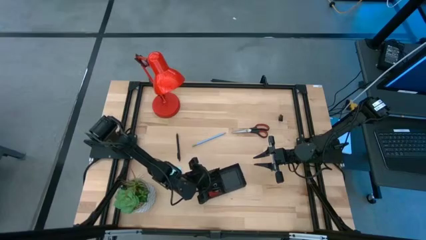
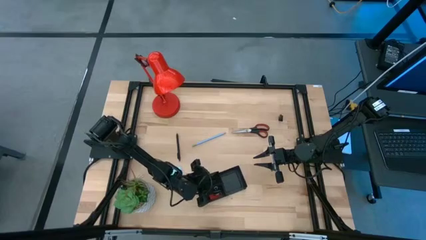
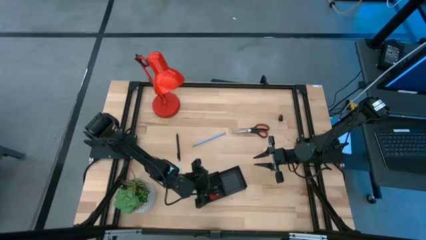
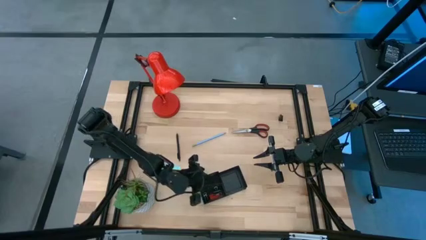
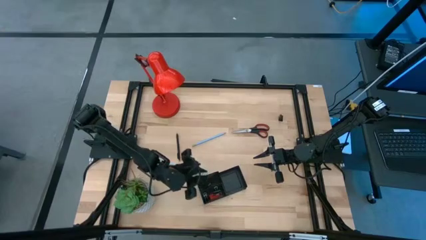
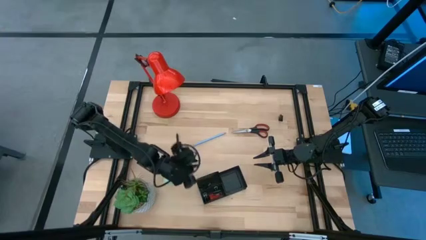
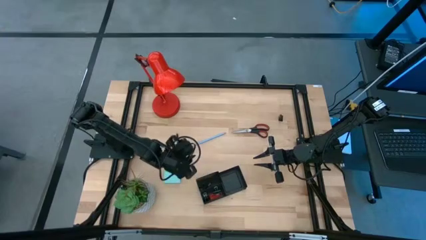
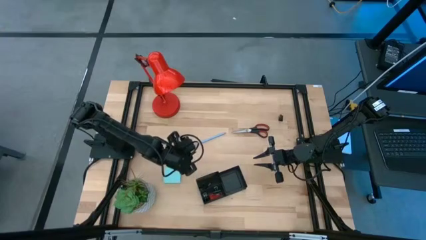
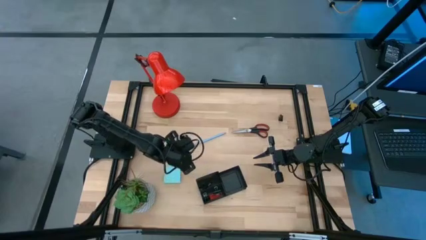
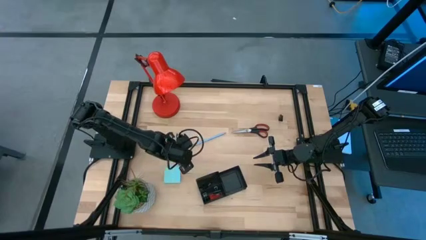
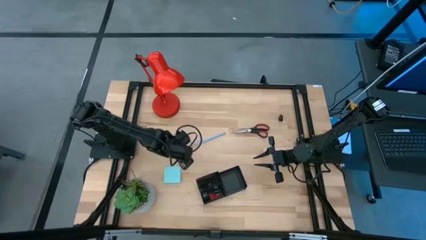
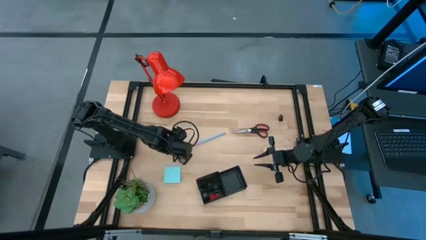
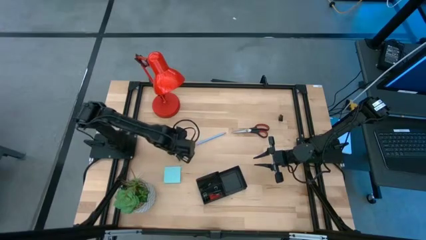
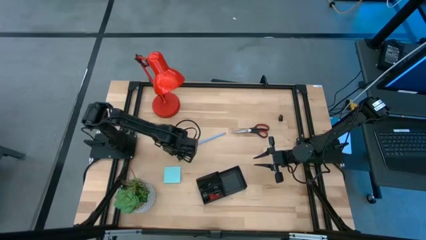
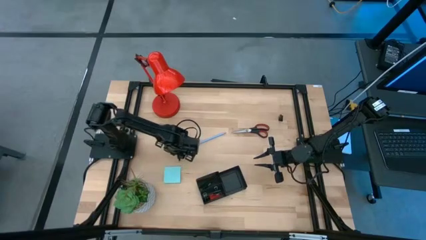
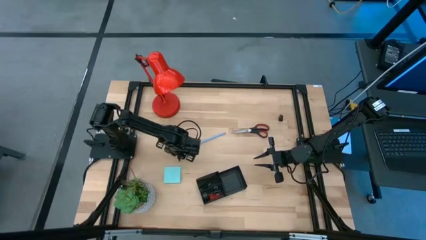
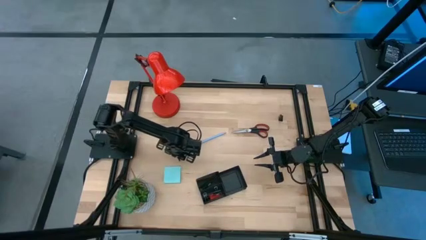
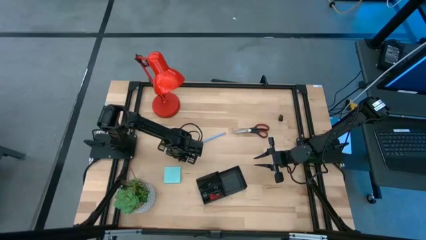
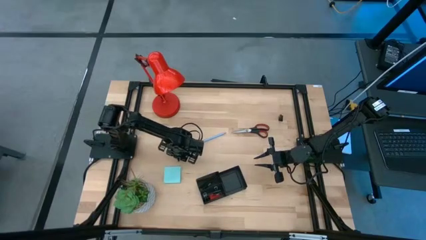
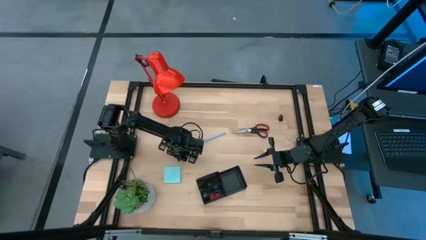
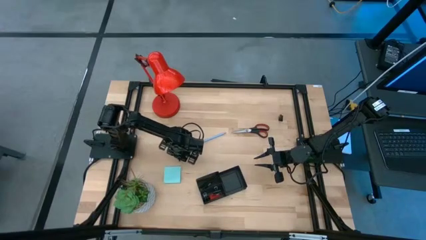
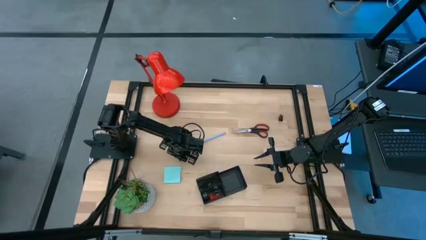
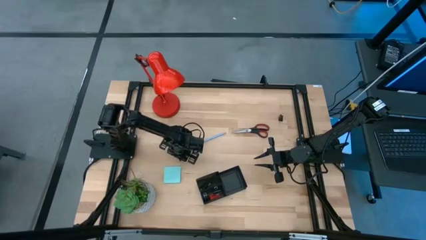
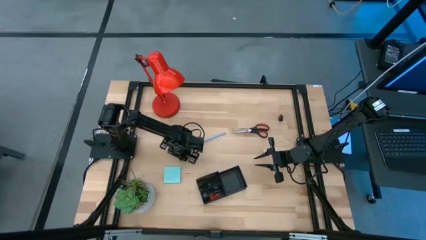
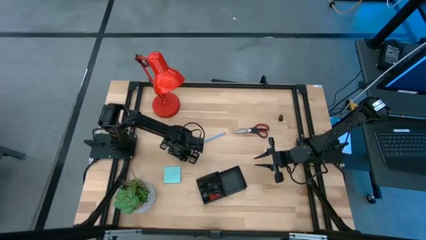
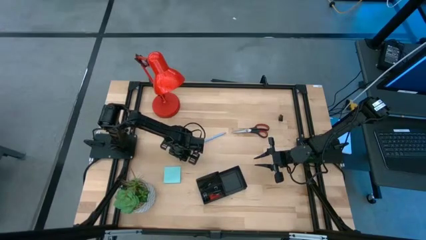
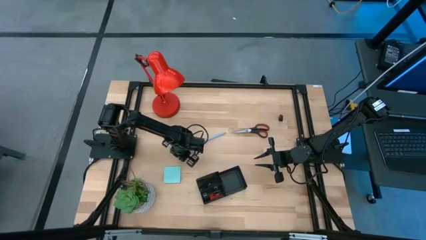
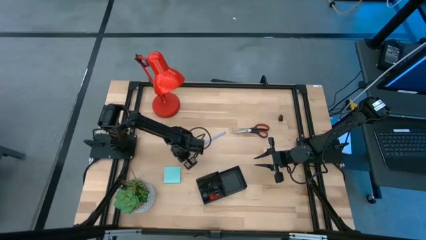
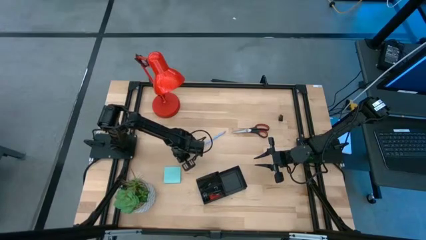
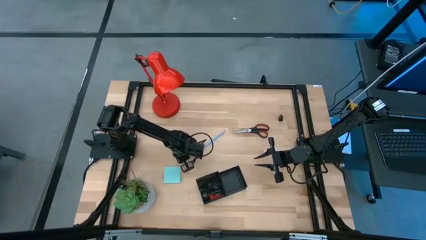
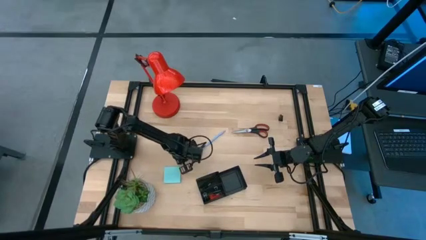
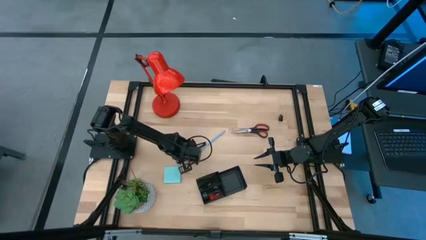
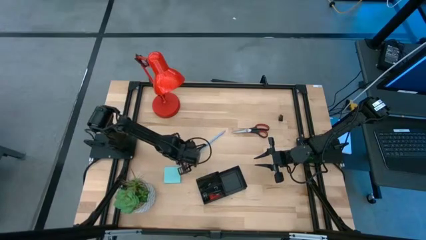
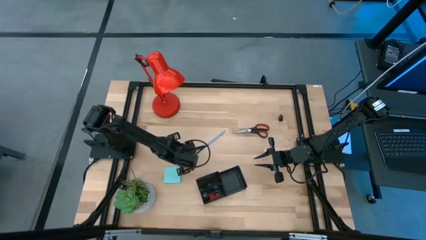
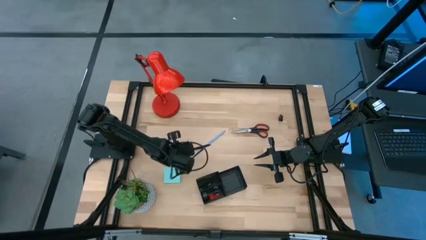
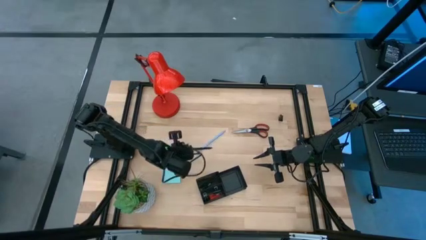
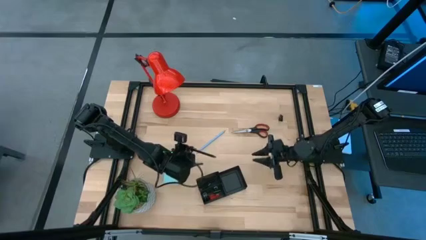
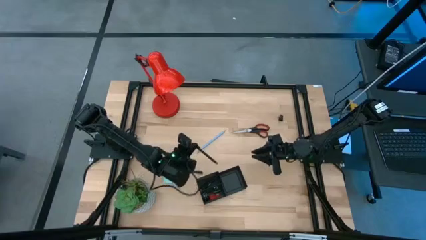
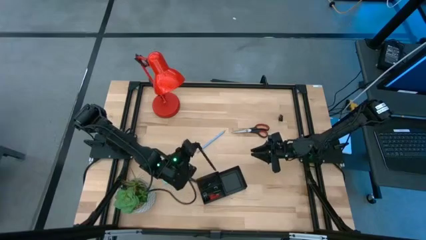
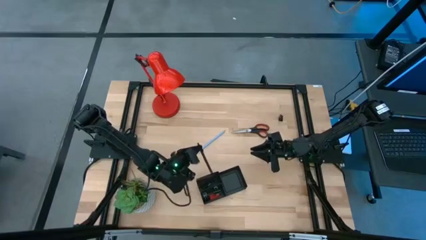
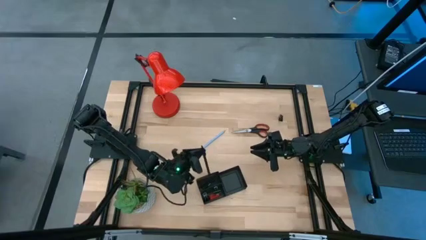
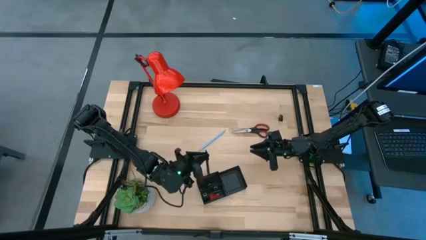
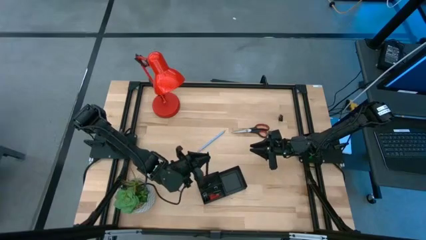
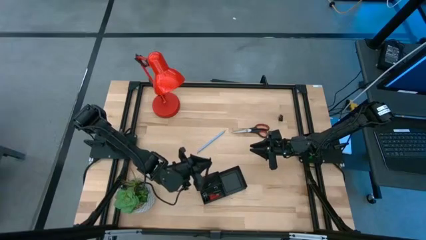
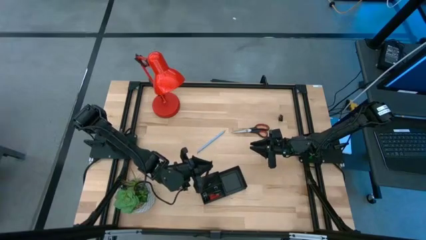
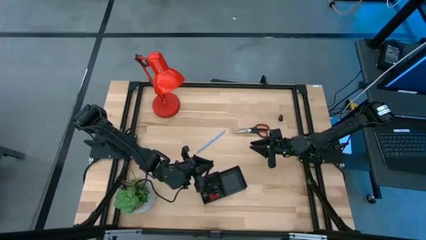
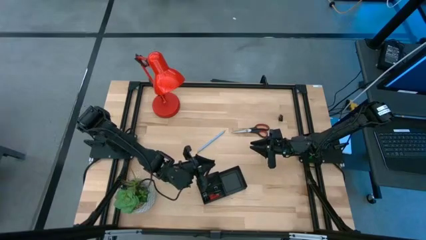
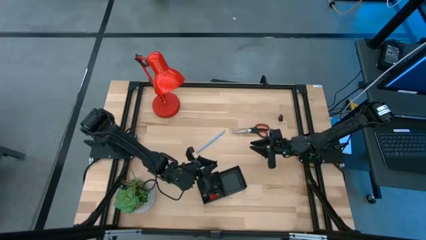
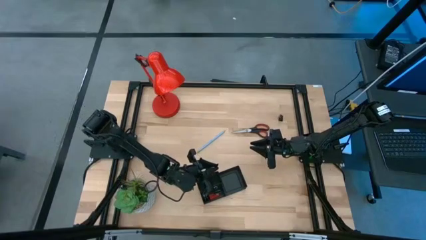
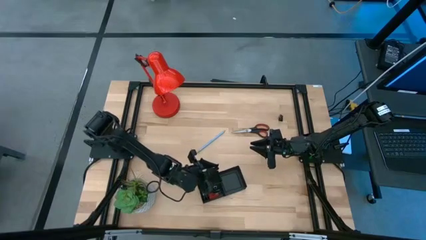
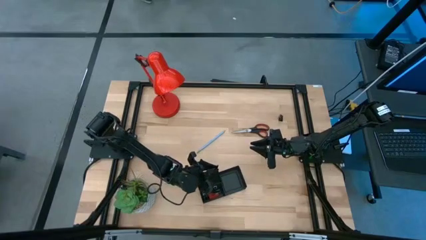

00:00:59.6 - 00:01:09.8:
Task: Pick and place office supplies into organizer
Put the black pen into the black desk organizer

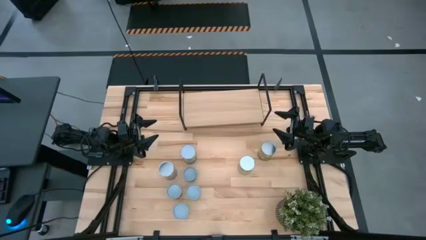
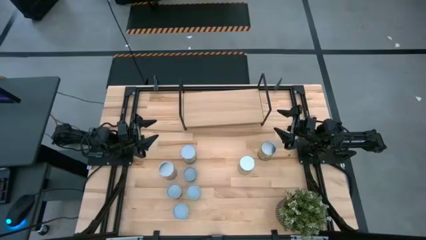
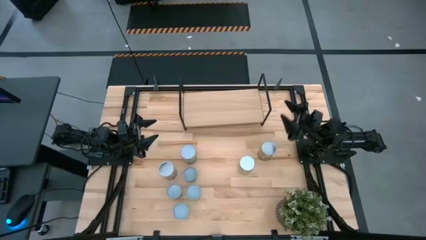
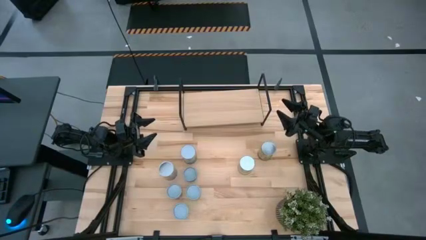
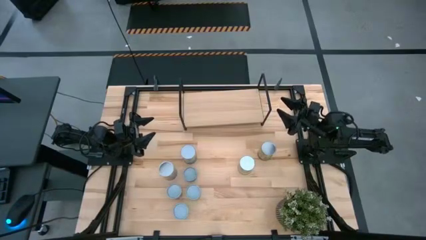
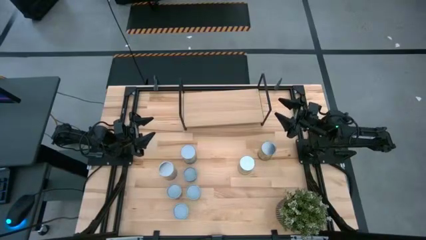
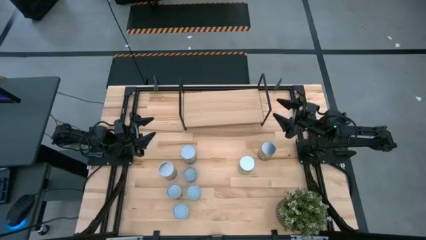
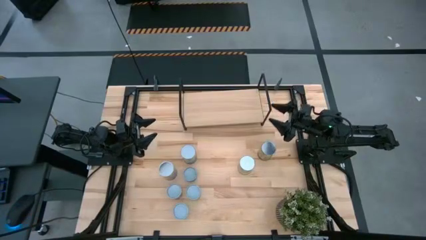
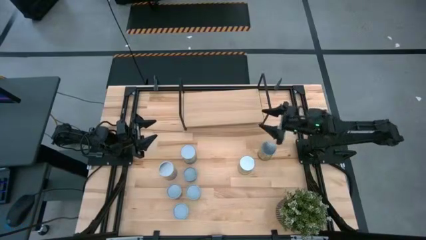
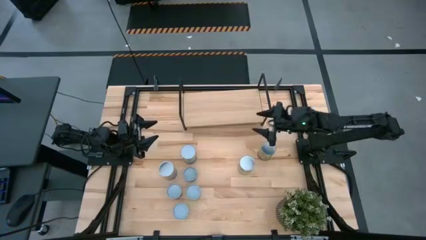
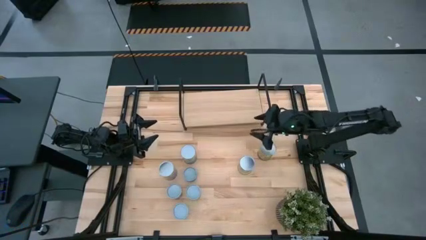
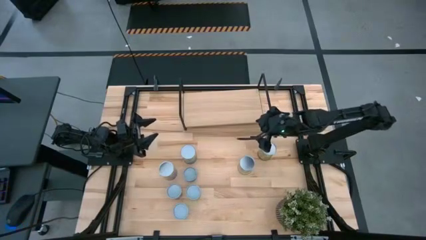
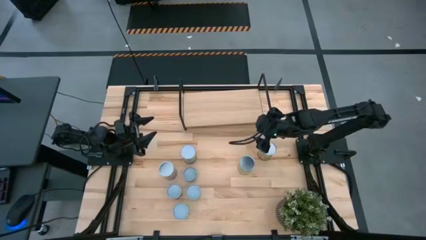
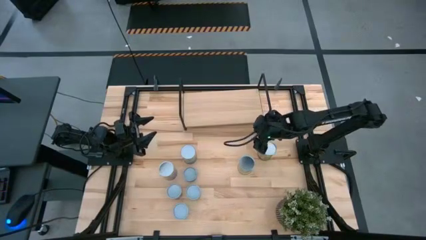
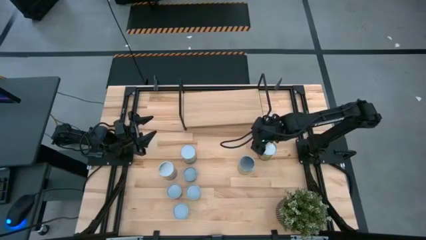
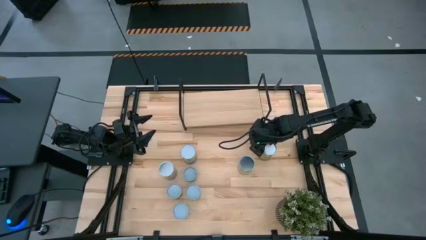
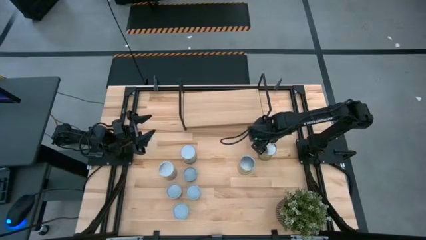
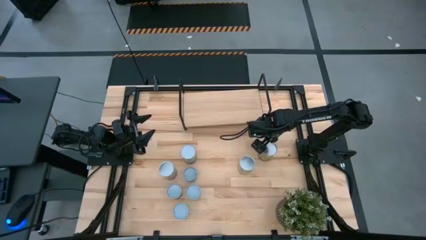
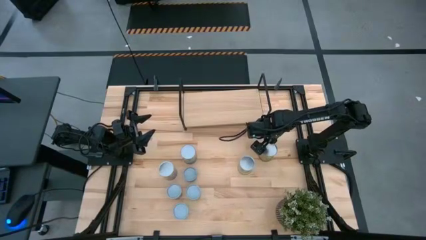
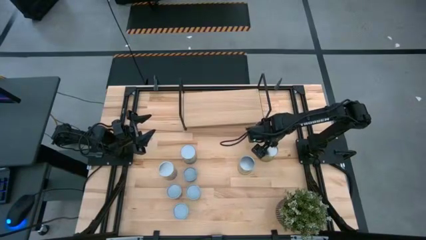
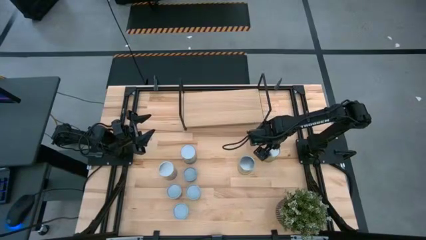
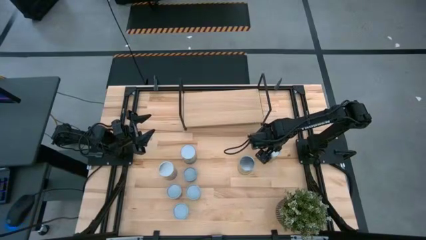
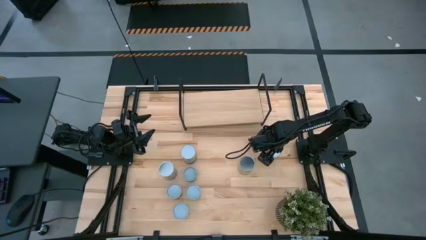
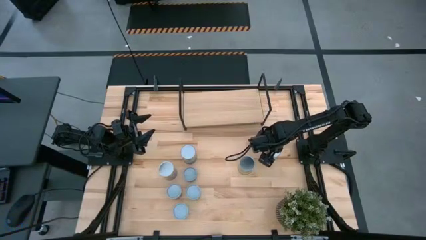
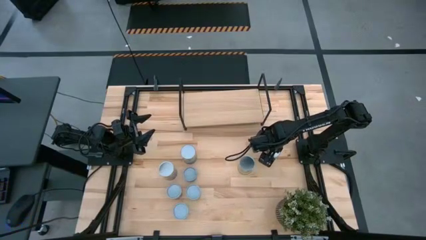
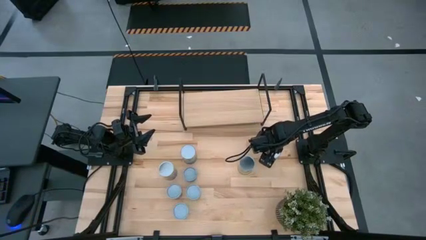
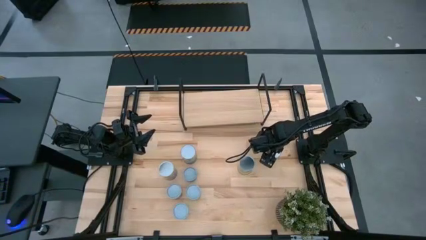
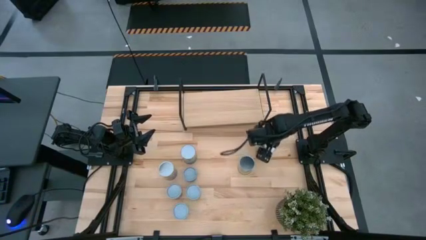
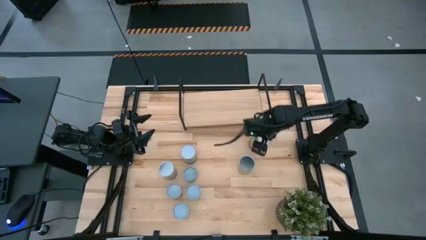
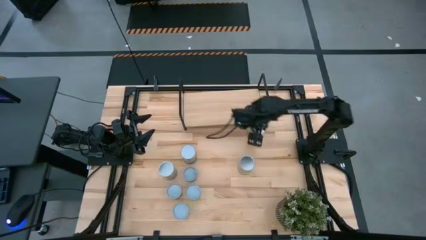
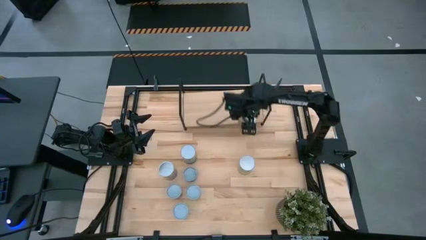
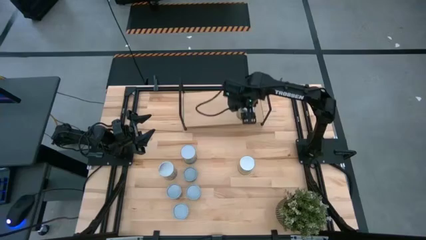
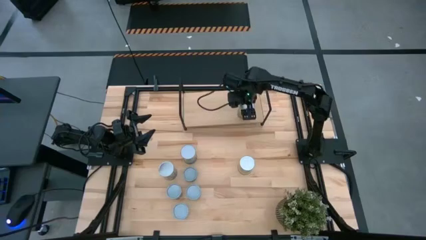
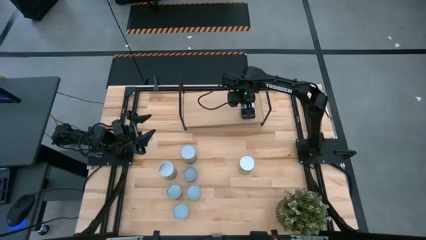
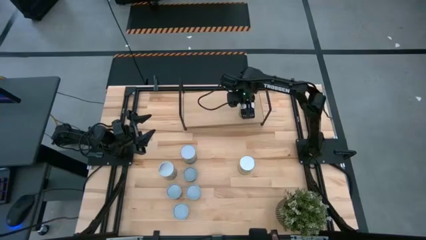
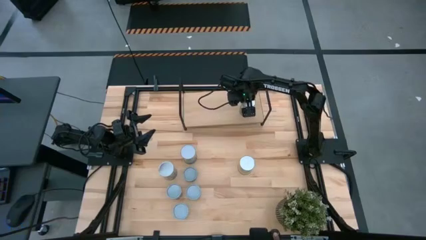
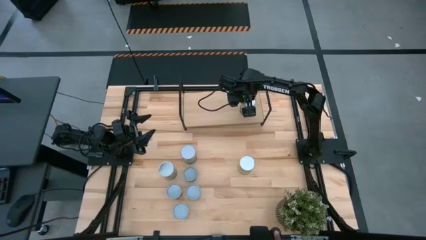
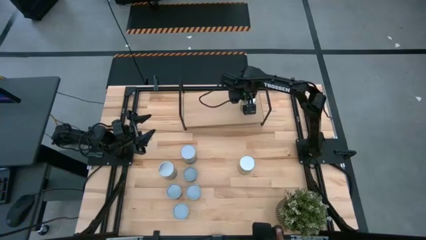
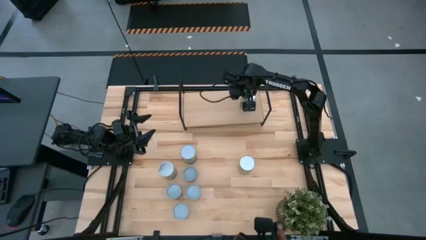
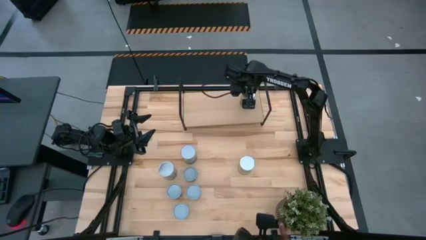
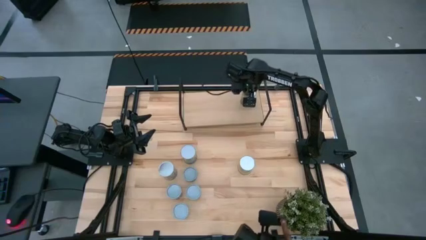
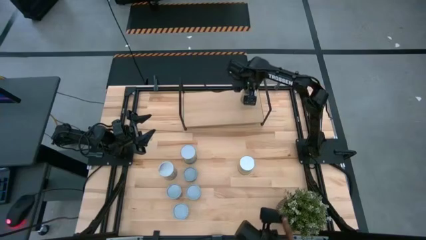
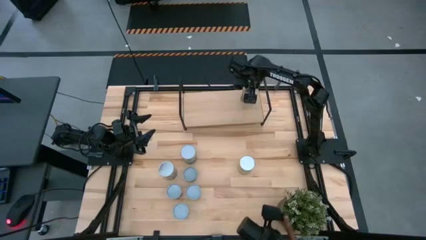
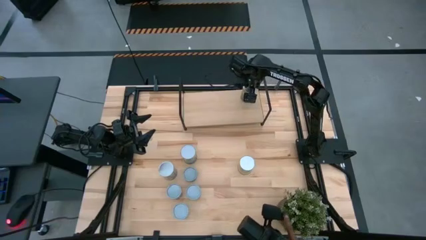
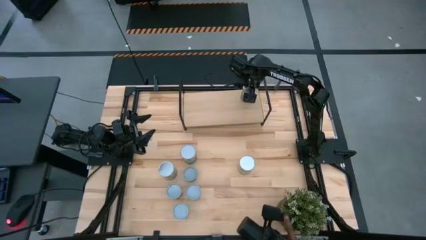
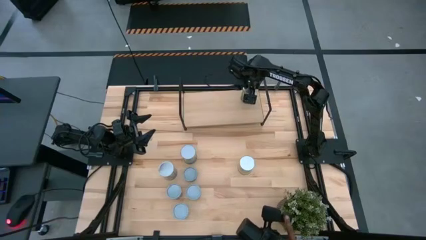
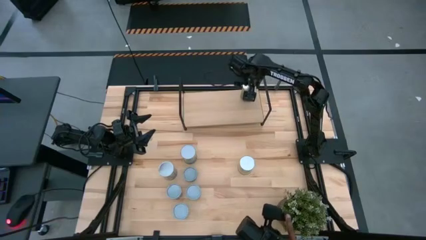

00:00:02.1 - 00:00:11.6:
Task: Pick and place cans onto a shelf
Put the canned oranges on the shelf
